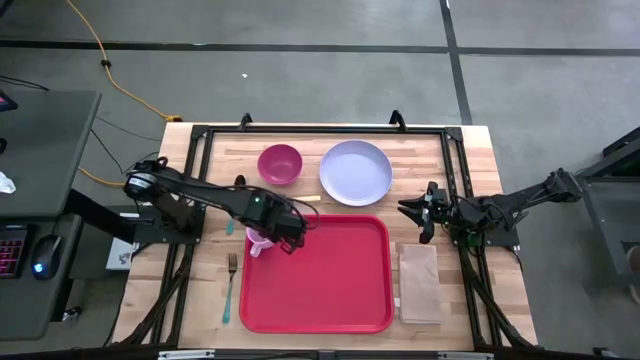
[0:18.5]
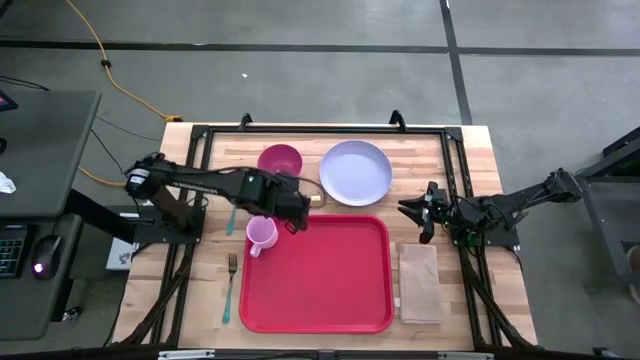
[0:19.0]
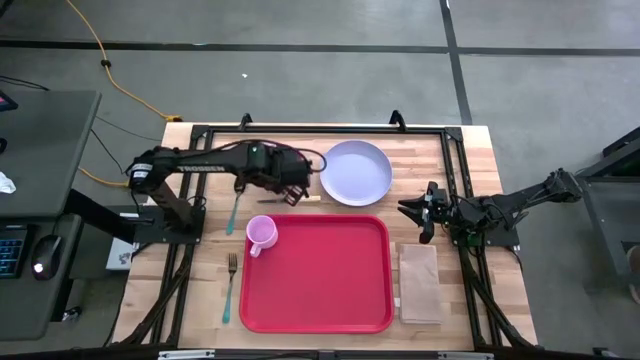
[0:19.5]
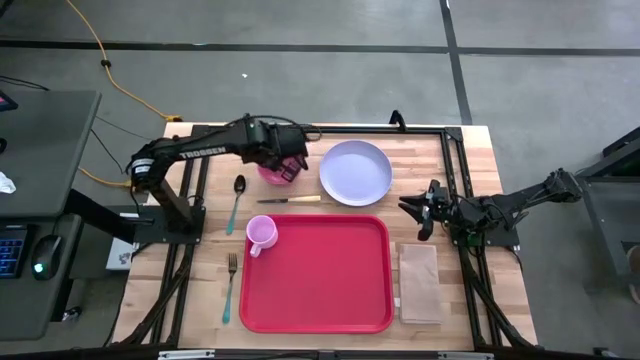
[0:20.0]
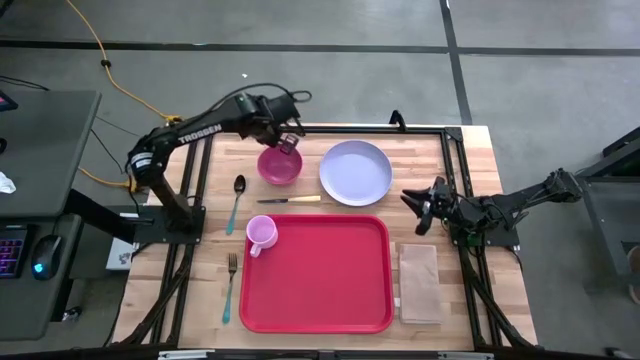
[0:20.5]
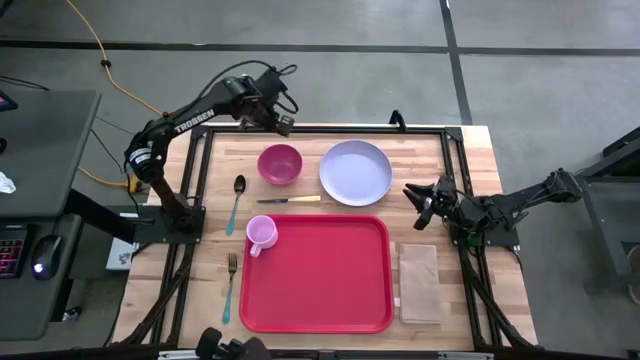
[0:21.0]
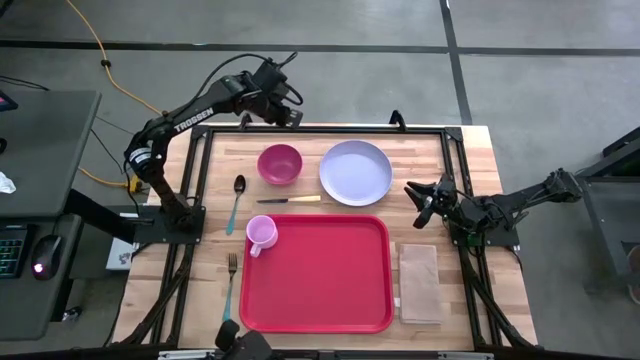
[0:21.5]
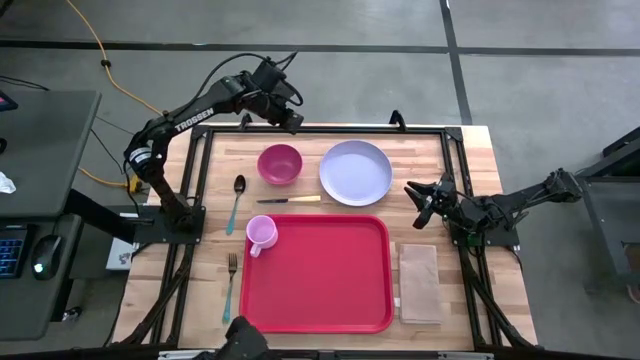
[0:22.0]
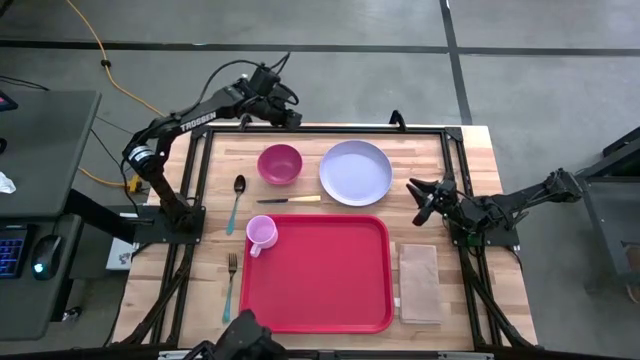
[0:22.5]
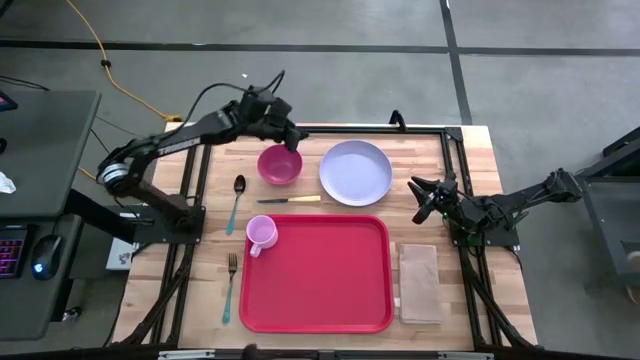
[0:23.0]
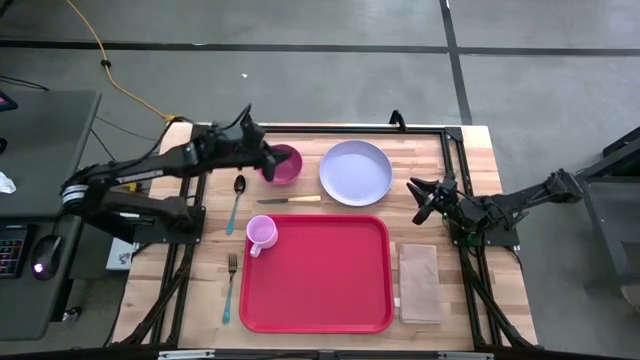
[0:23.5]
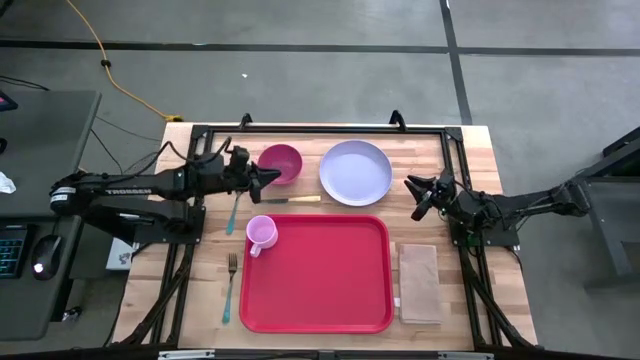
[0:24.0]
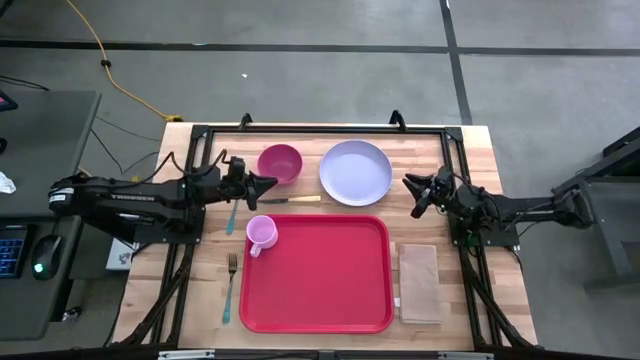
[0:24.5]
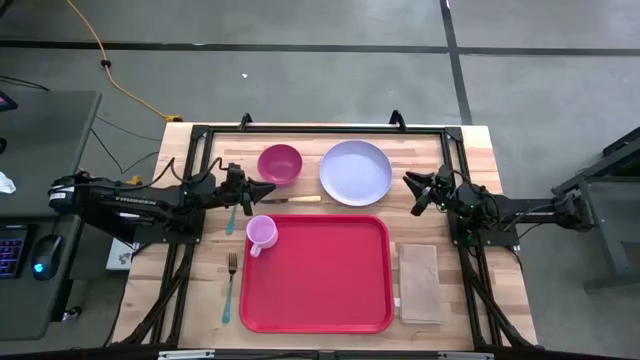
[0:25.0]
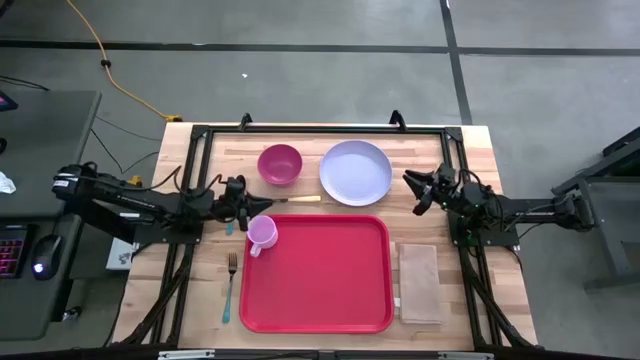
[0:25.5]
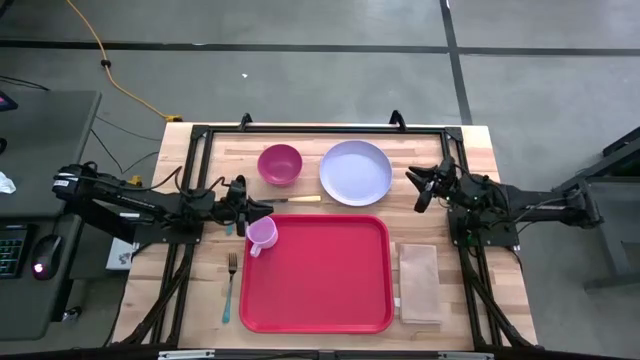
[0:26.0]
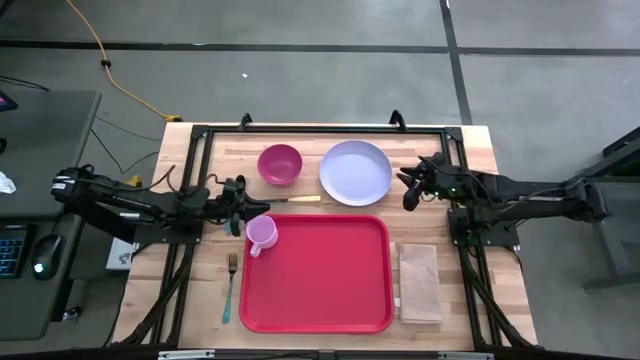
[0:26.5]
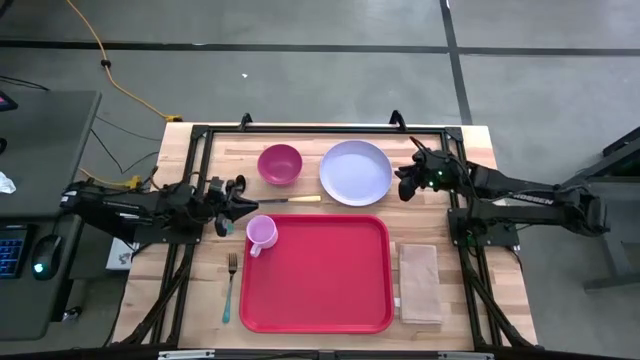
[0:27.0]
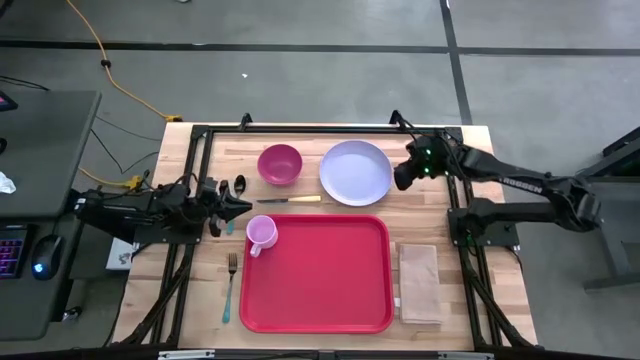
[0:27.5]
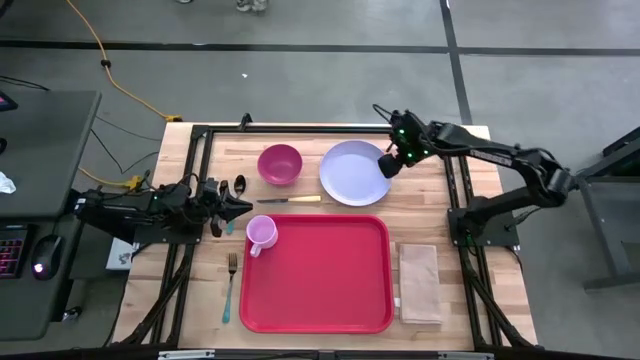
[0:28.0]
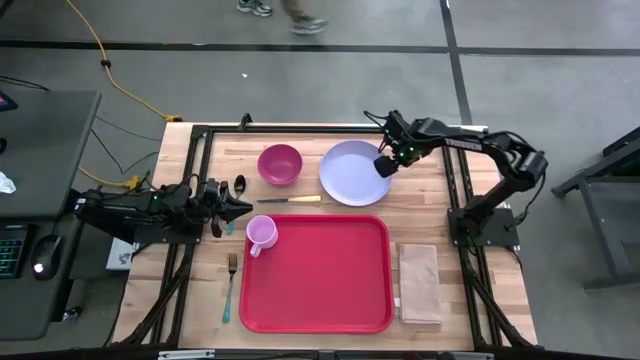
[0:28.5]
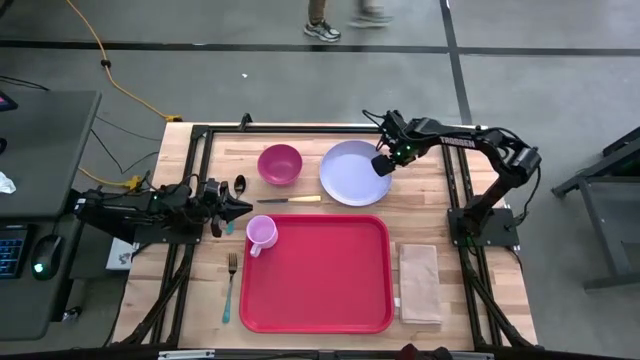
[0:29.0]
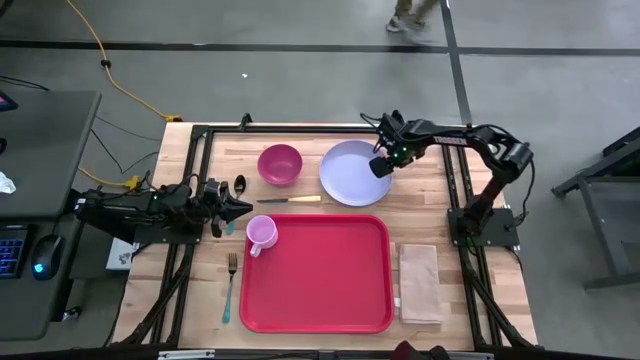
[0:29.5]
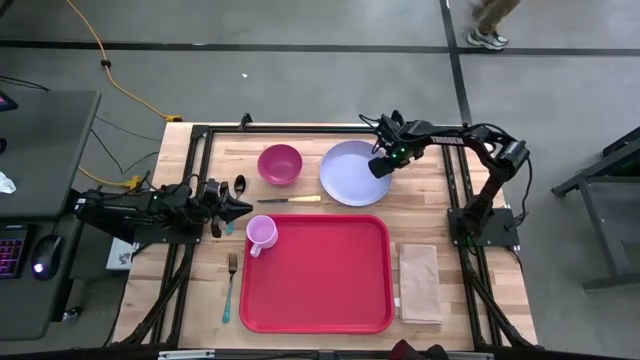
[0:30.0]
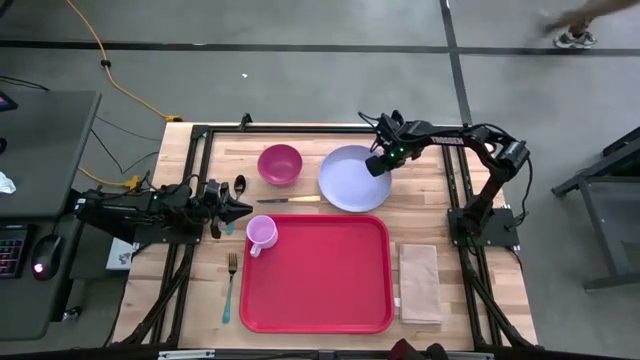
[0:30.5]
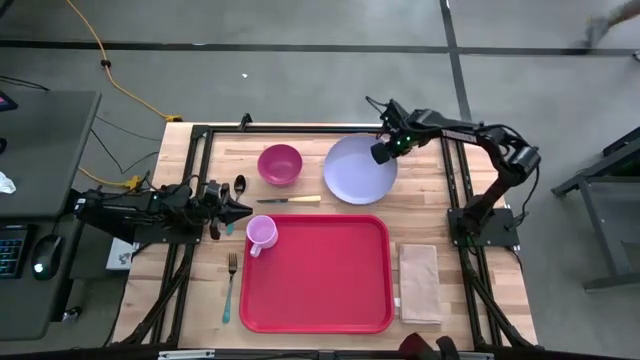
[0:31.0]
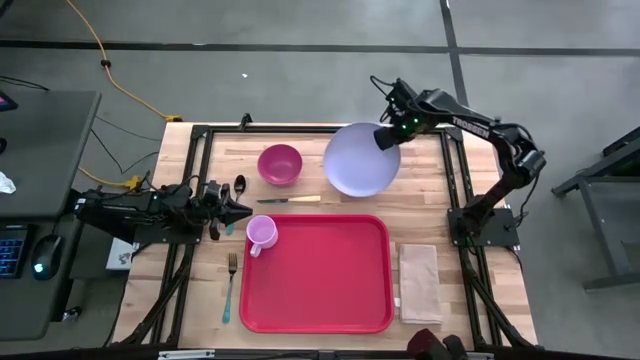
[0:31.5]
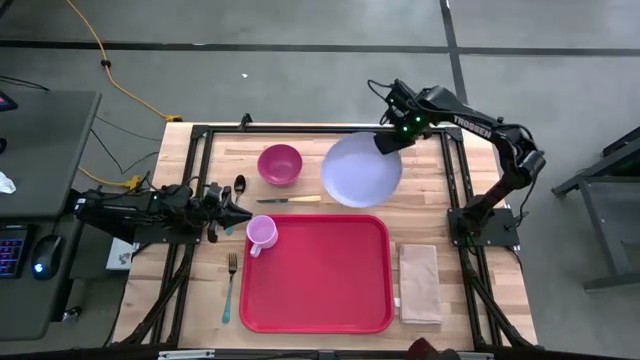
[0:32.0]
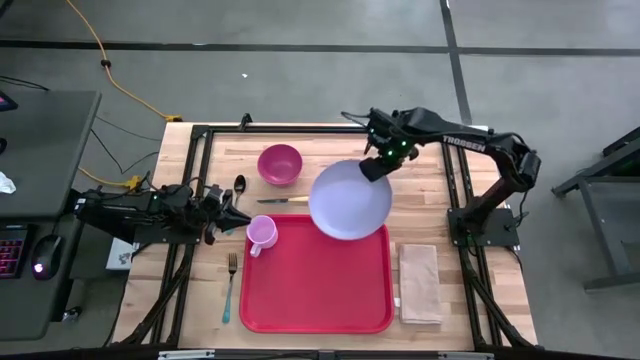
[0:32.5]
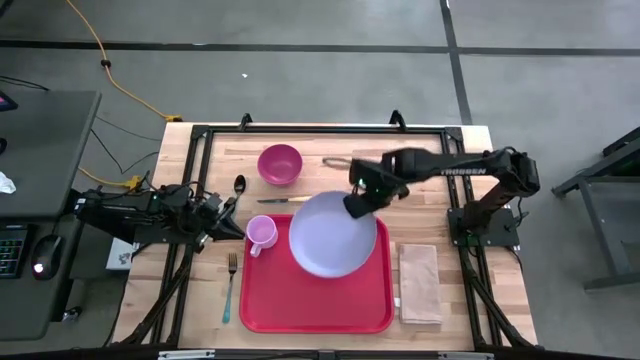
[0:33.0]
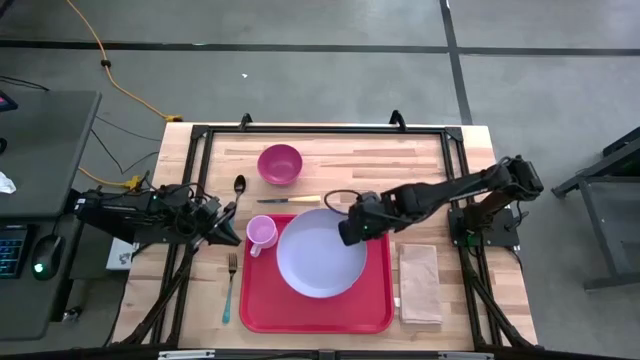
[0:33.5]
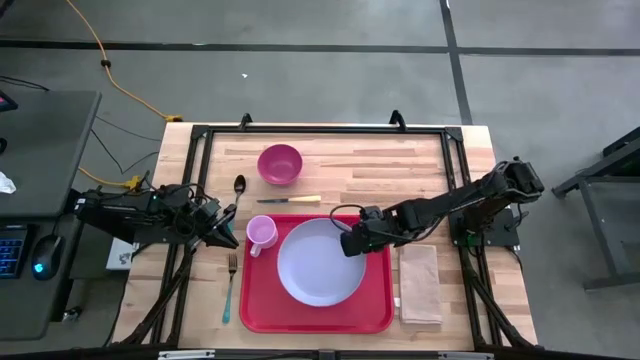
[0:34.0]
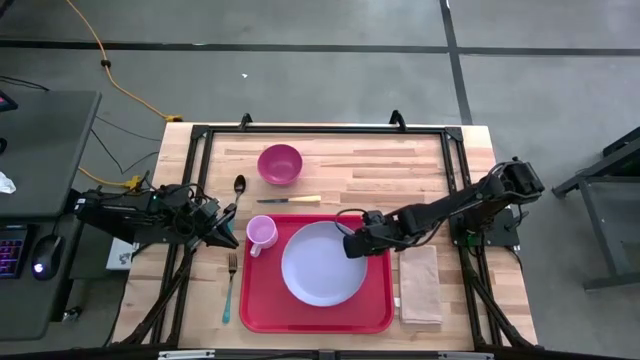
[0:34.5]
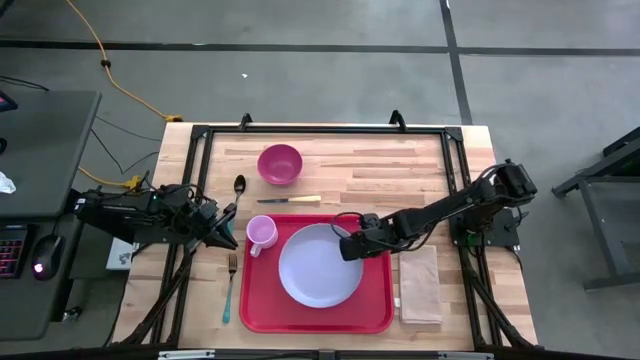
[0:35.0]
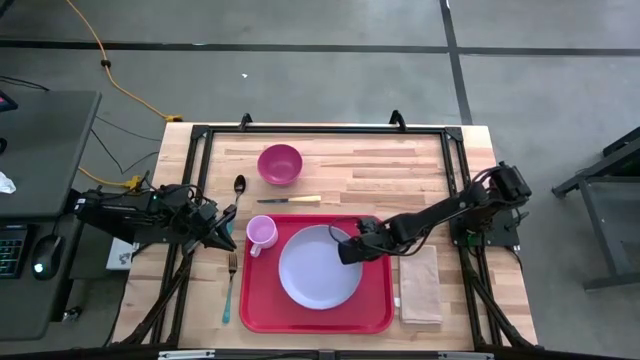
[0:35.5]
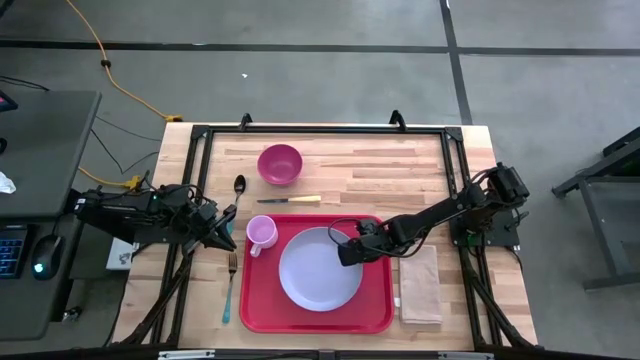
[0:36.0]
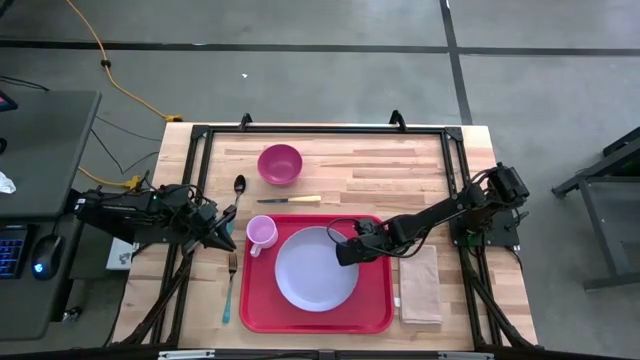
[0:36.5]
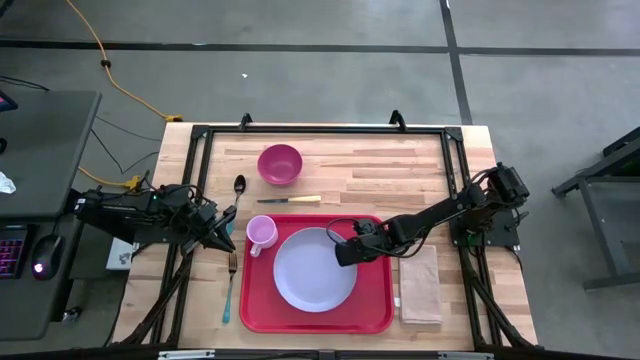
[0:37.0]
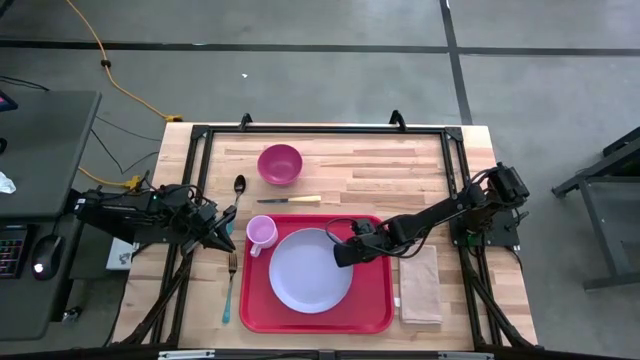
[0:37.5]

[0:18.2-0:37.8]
Task: Set up tray
Put the white plate on the center of the red tray
